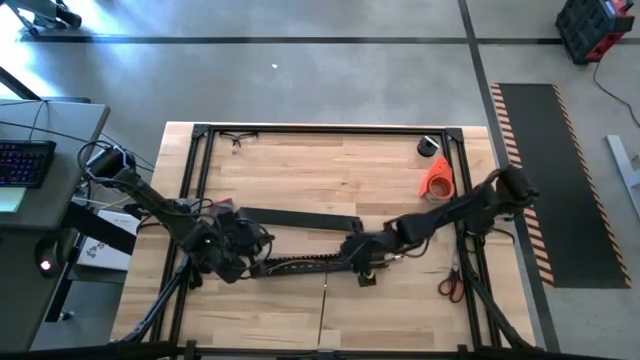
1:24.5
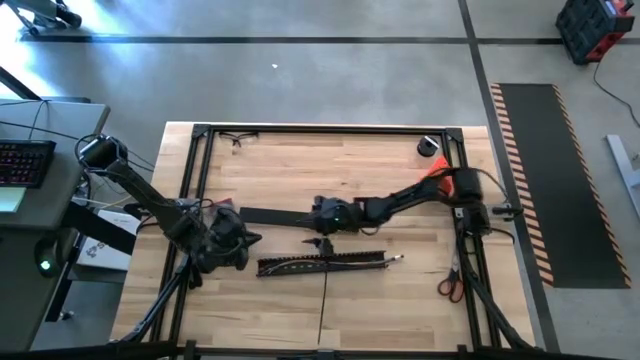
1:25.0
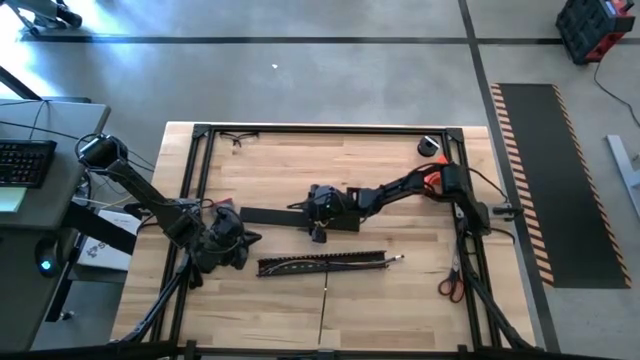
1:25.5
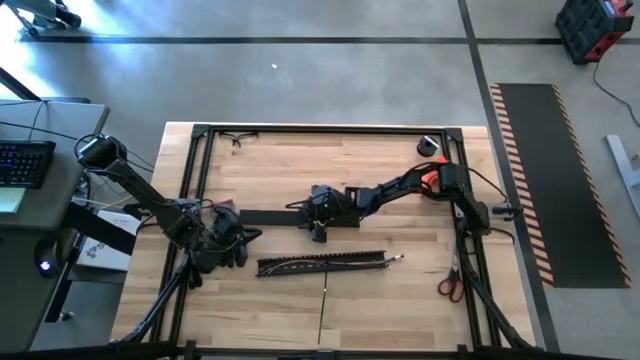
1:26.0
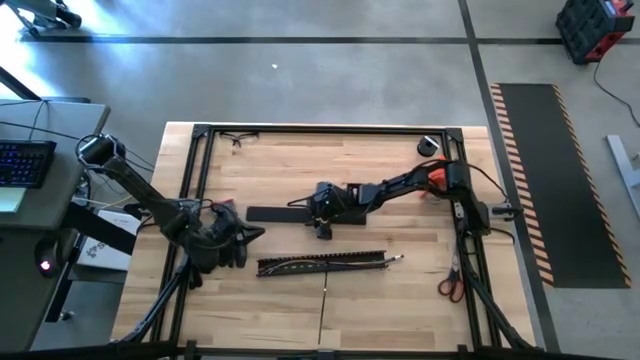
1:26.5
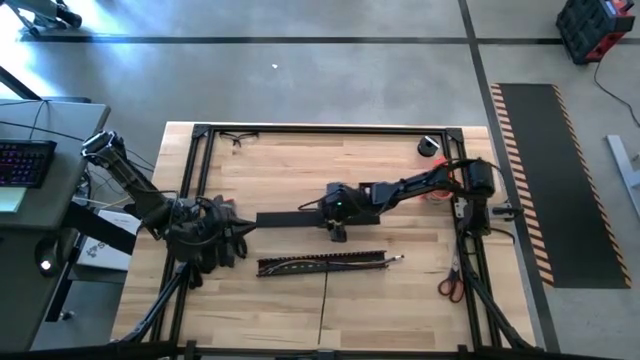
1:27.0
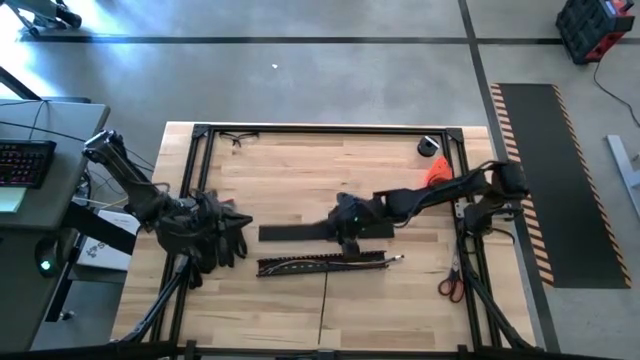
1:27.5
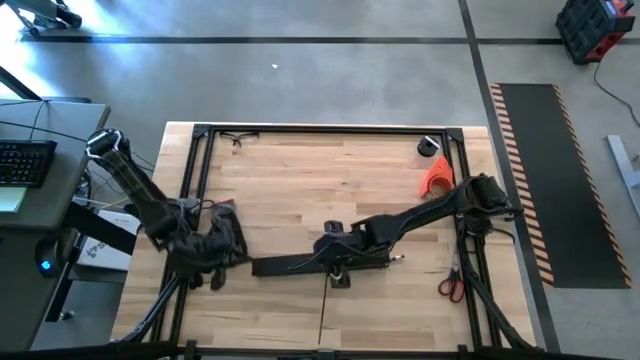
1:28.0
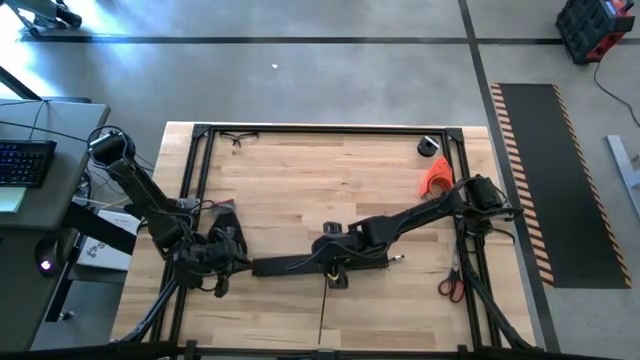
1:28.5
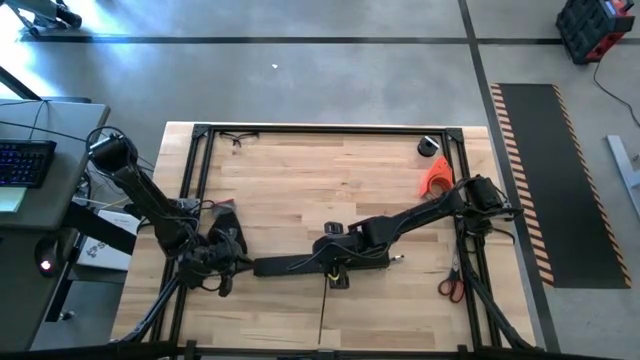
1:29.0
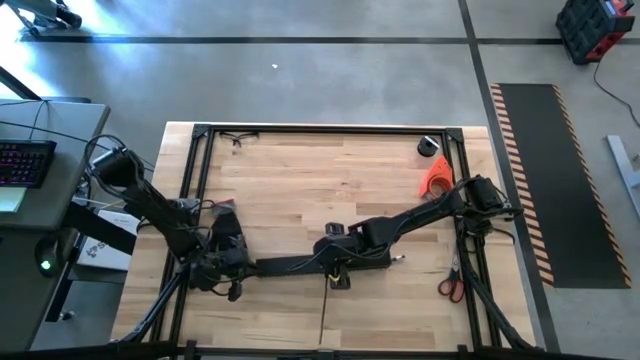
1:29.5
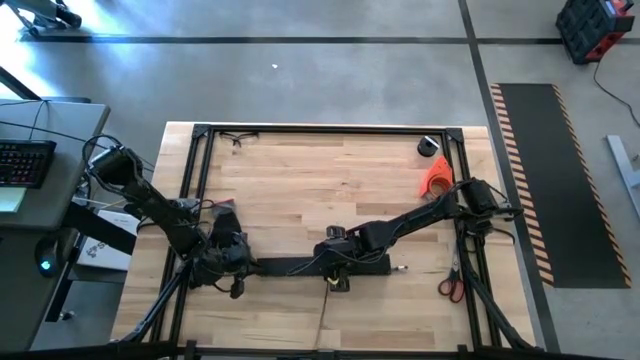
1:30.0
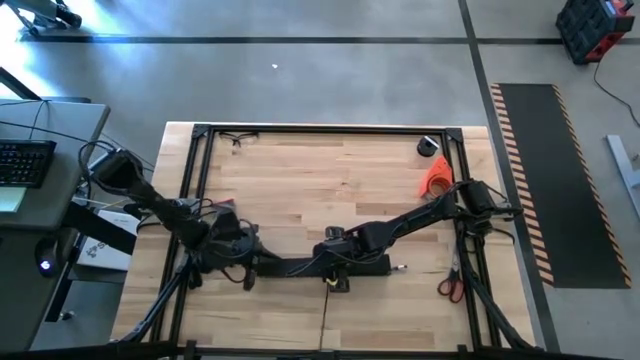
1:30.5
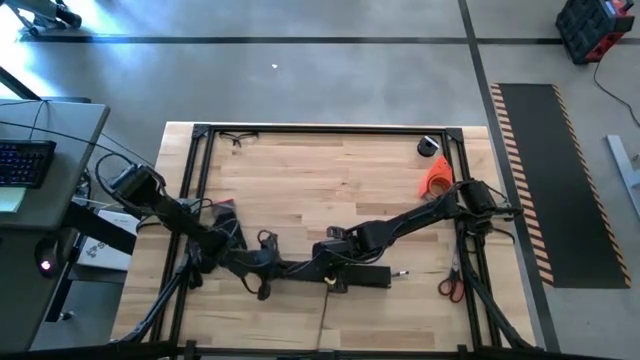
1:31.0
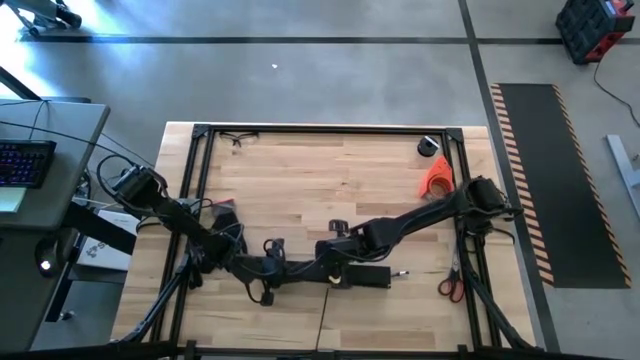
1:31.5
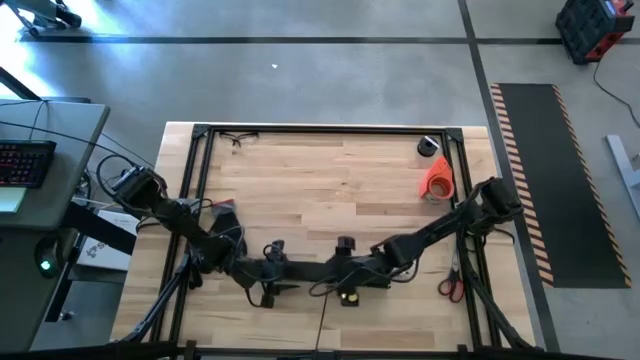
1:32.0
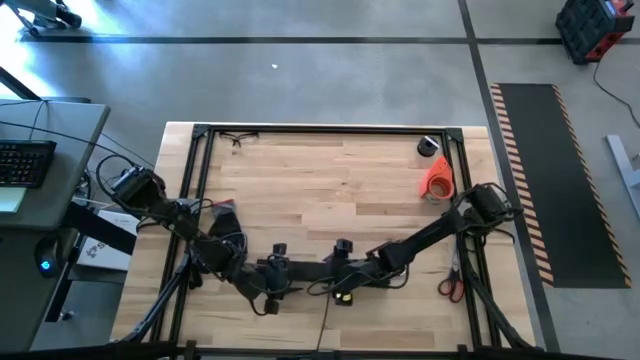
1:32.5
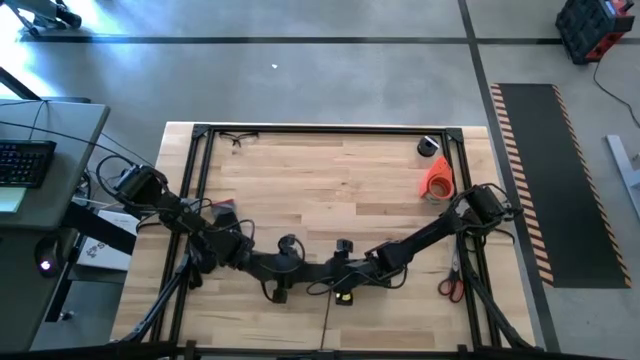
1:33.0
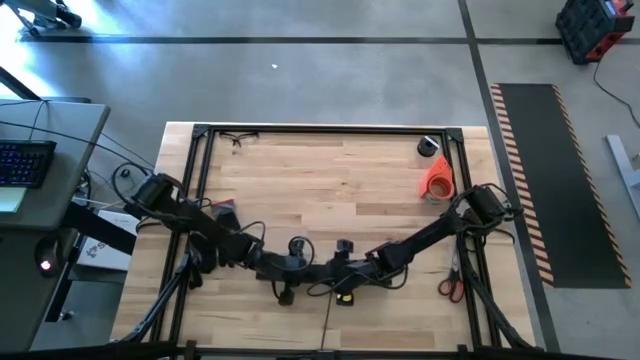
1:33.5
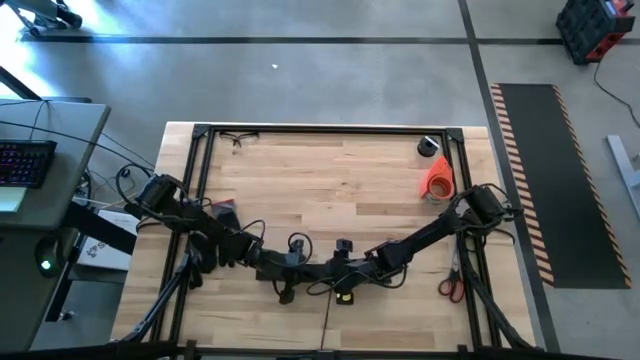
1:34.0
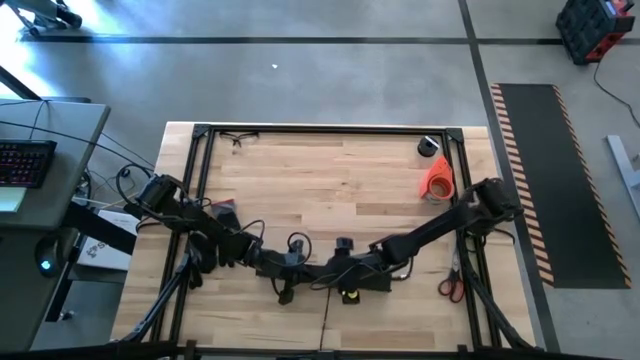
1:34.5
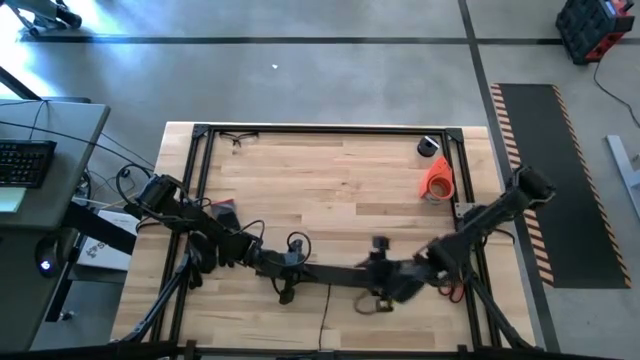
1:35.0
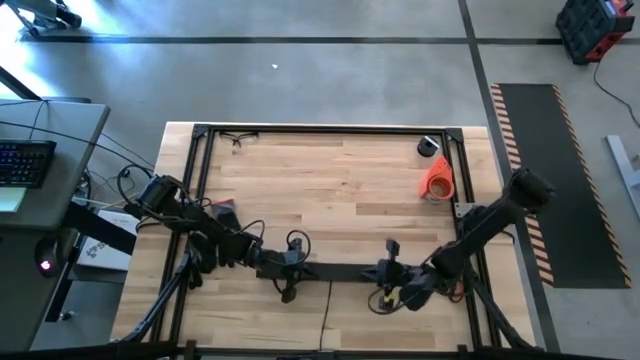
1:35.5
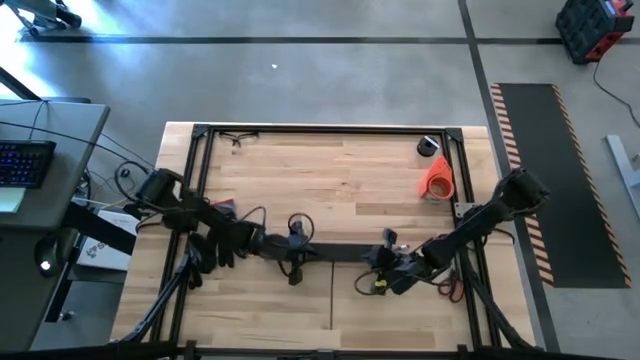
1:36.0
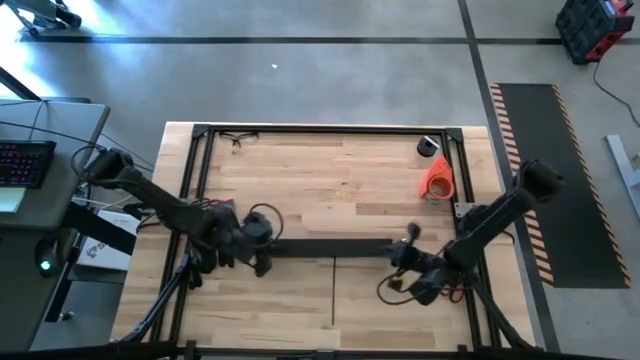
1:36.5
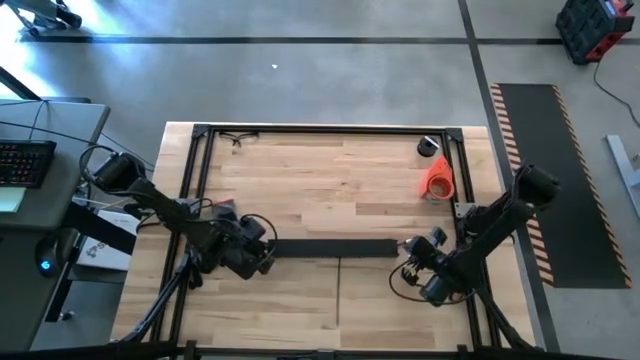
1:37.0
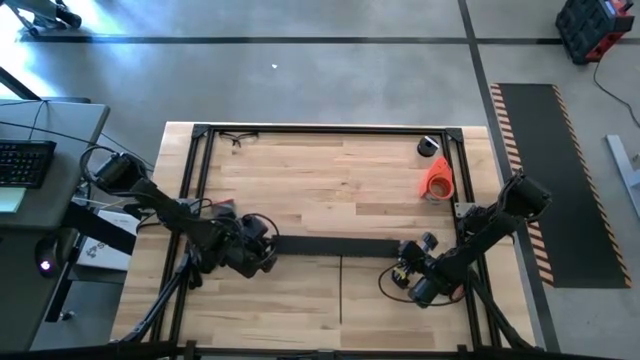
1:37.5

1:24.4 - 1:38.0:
Task: Ziptie cables
Close the black cable duct

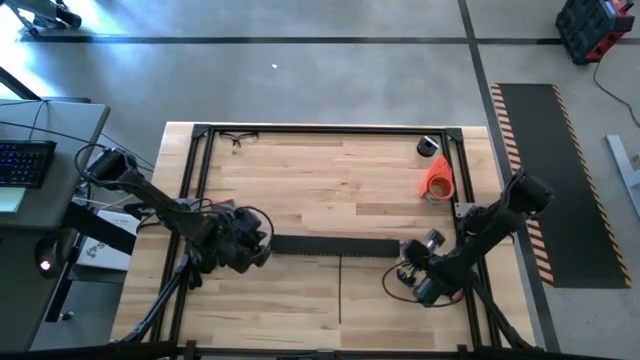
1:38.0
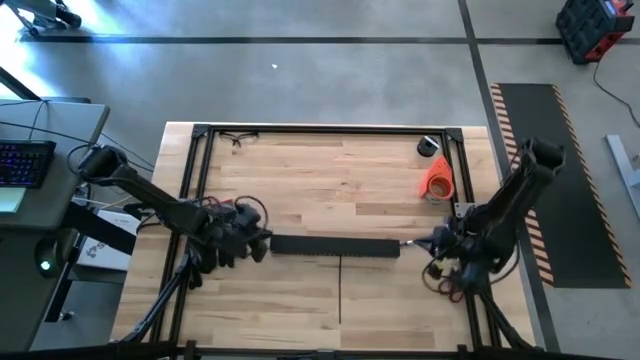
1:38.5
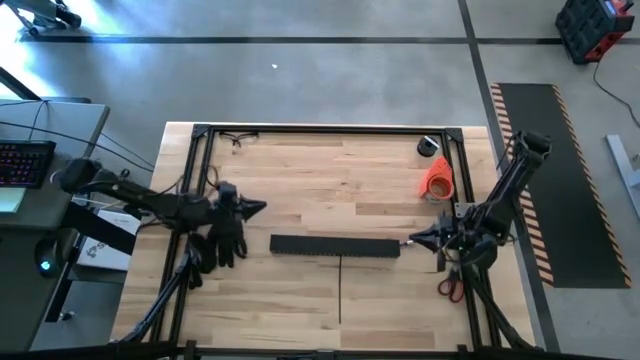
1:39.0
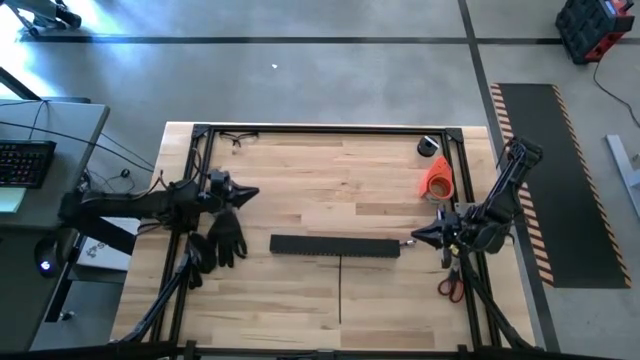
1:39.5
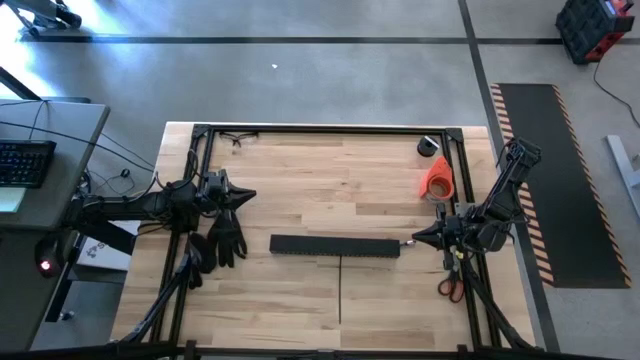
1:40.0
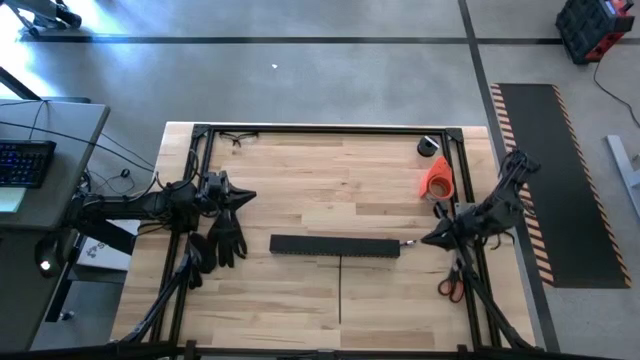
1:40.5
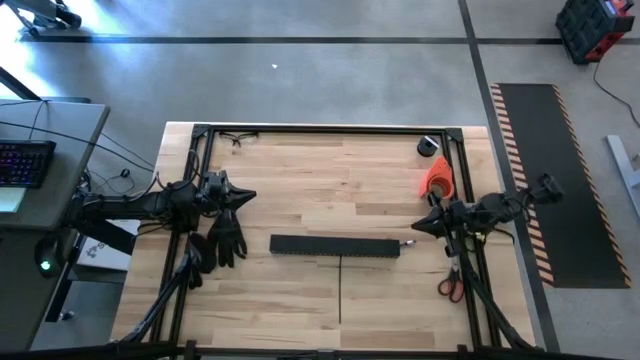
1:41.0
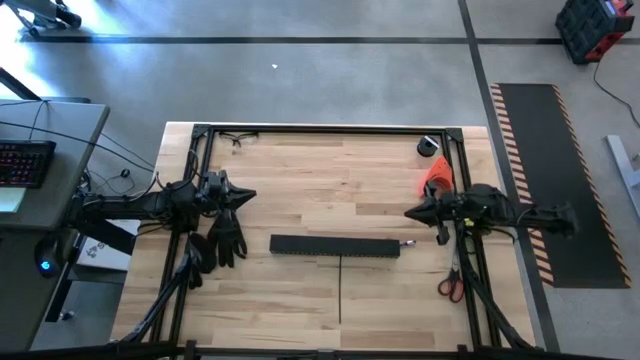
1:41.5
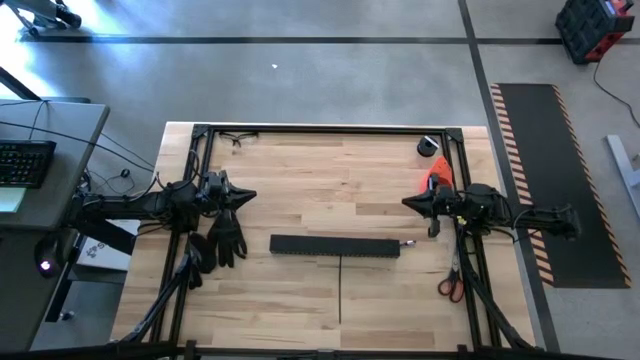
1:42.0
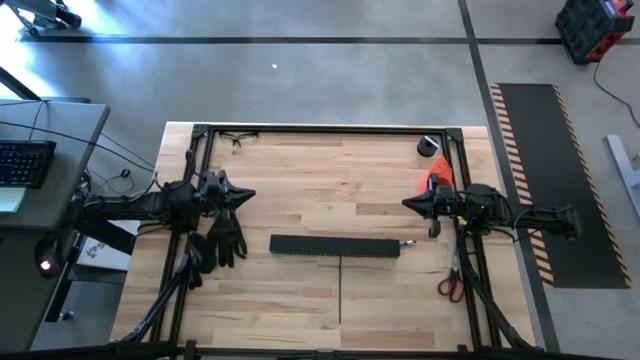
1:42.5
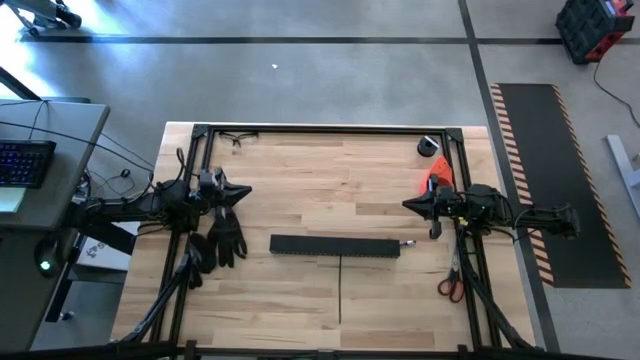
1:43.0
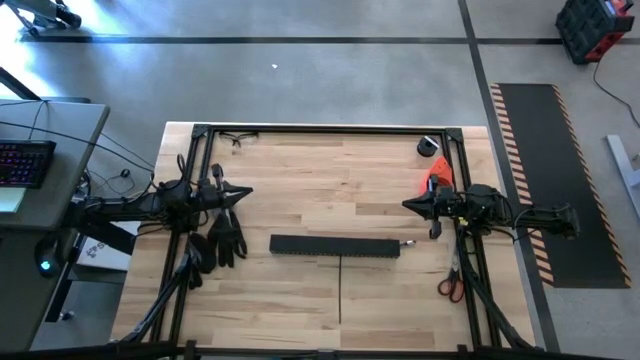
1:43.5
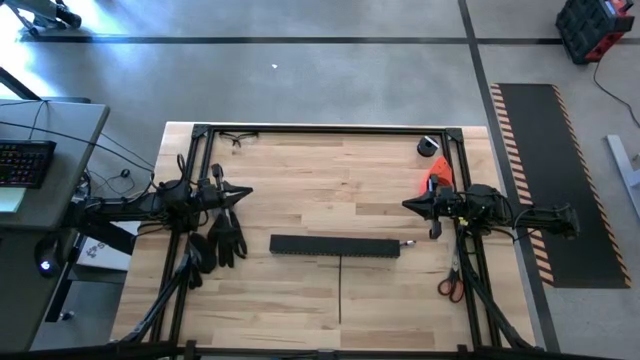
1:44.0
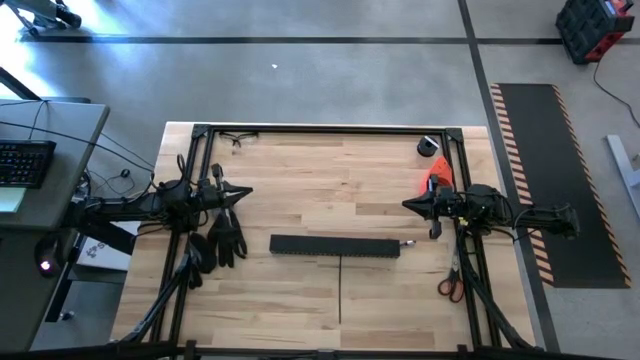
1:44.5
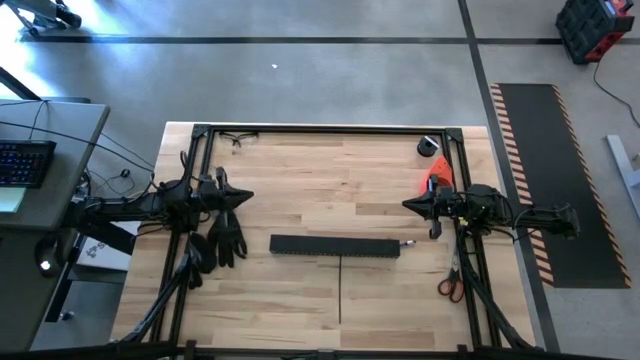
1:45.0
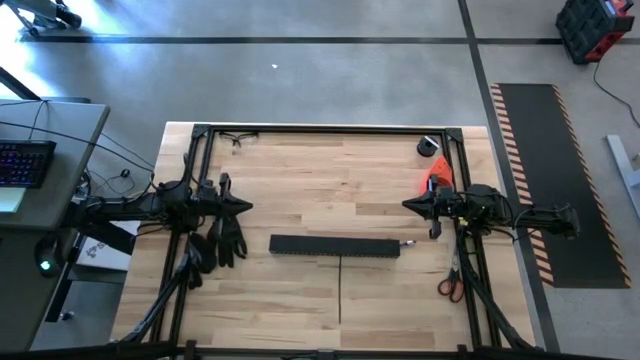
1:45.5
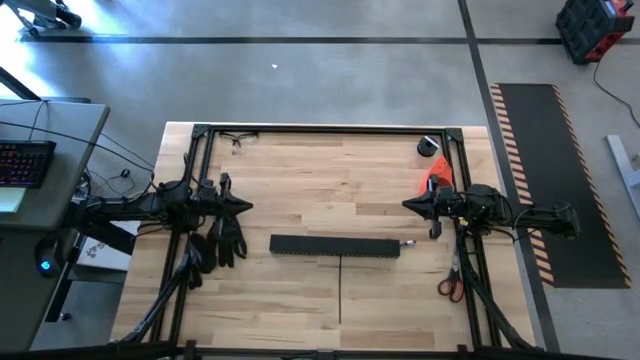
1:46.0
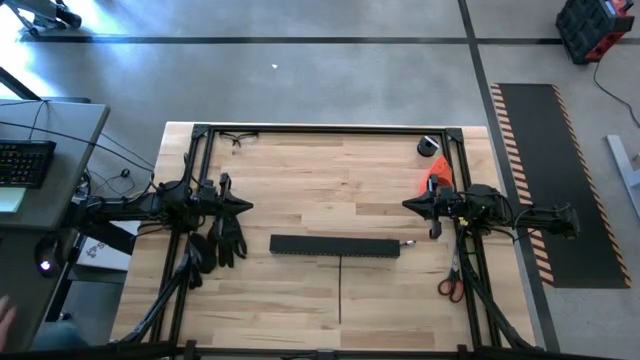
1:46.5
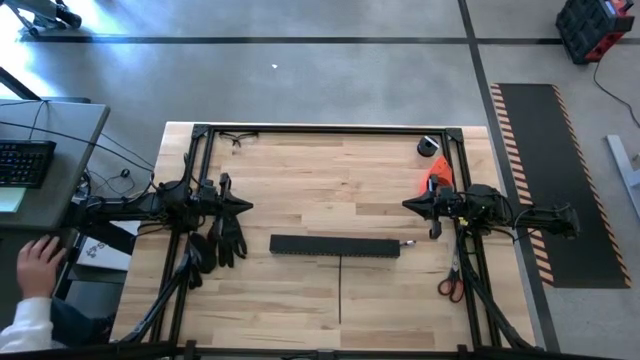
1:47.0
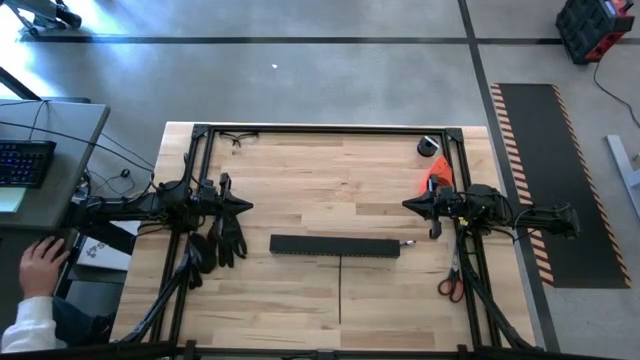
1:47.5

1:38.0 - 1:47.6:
Return to Home Position
